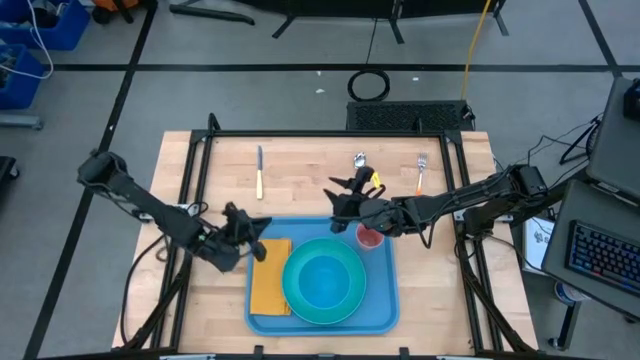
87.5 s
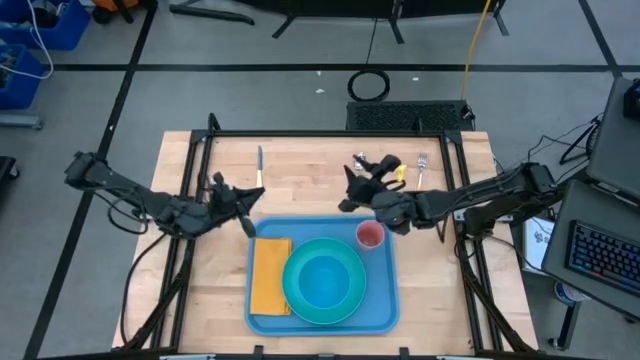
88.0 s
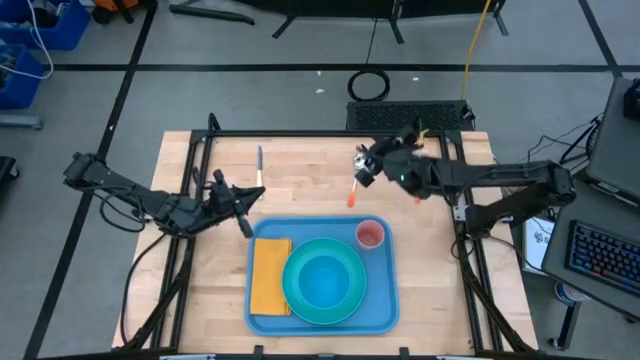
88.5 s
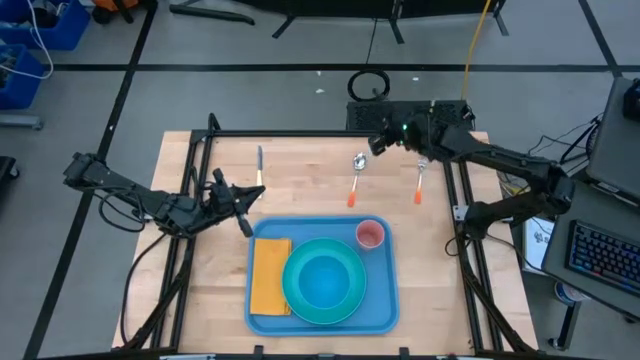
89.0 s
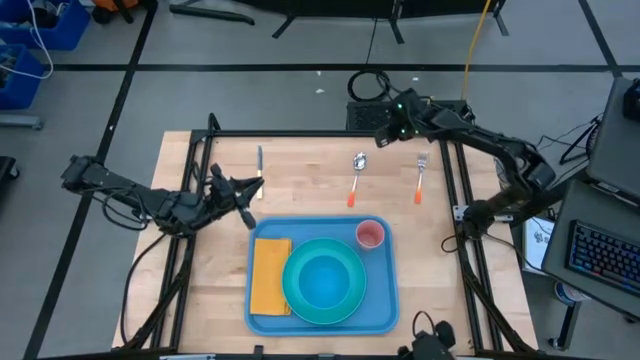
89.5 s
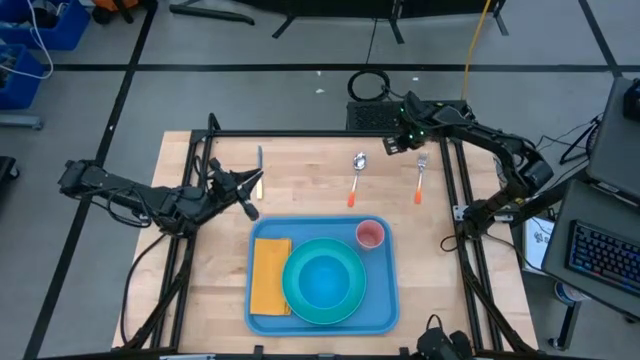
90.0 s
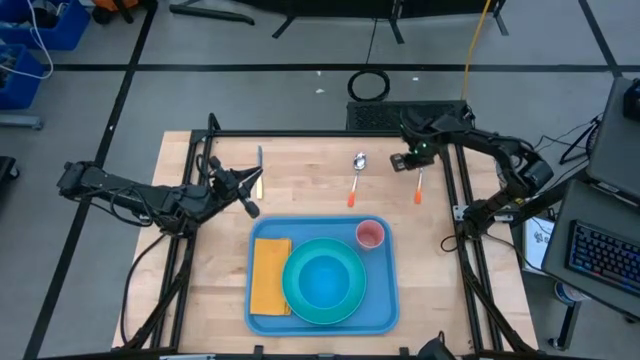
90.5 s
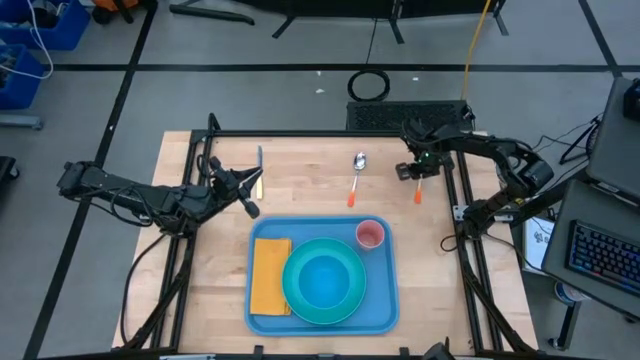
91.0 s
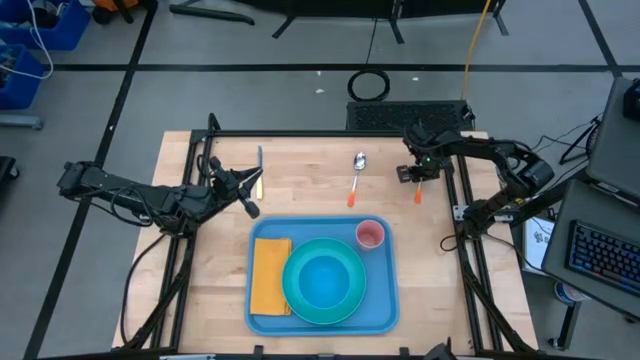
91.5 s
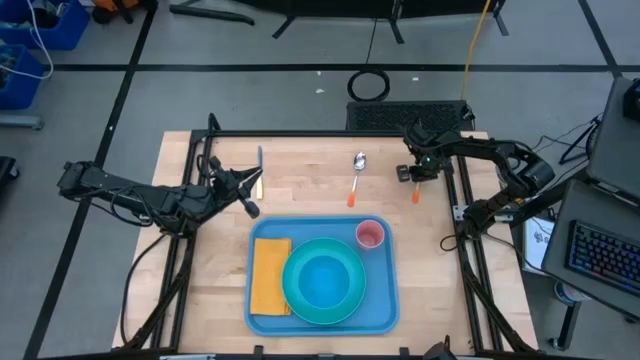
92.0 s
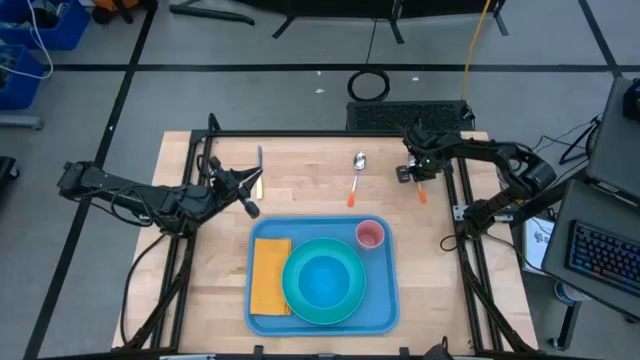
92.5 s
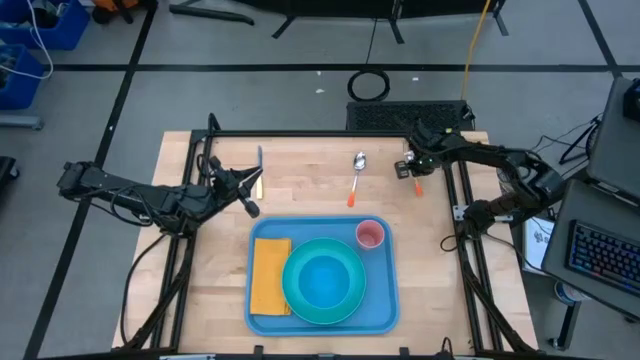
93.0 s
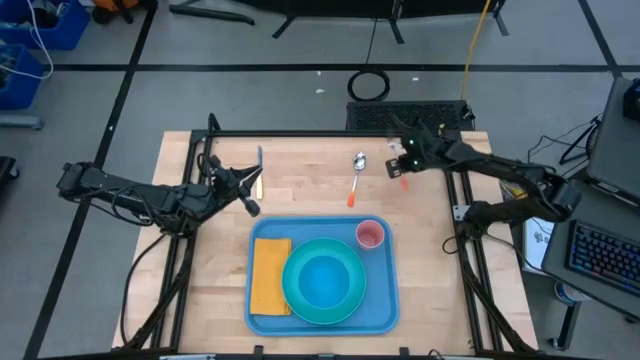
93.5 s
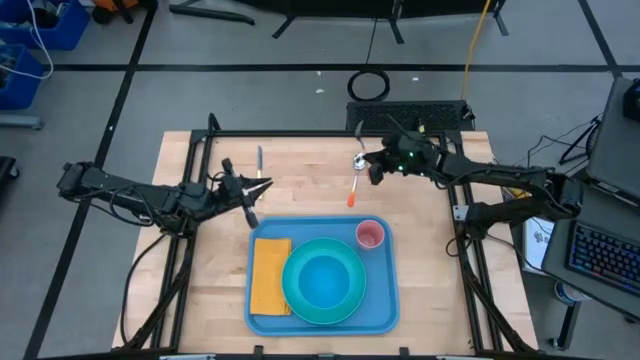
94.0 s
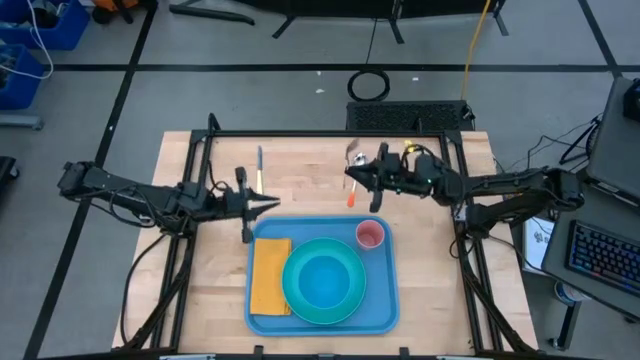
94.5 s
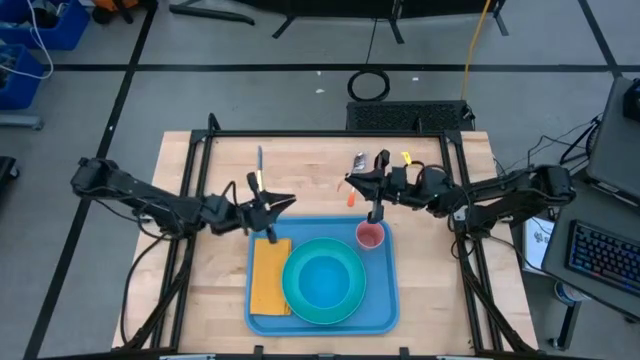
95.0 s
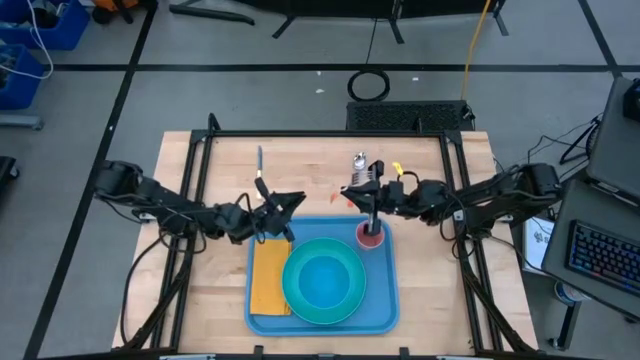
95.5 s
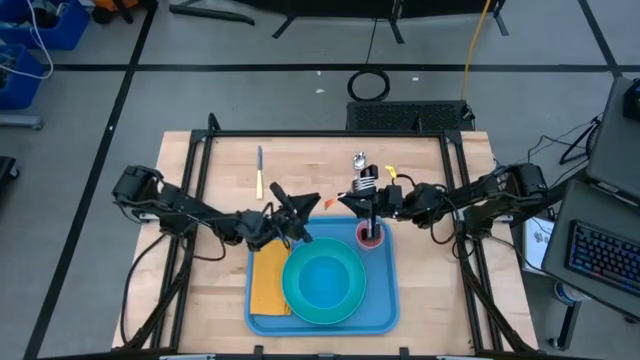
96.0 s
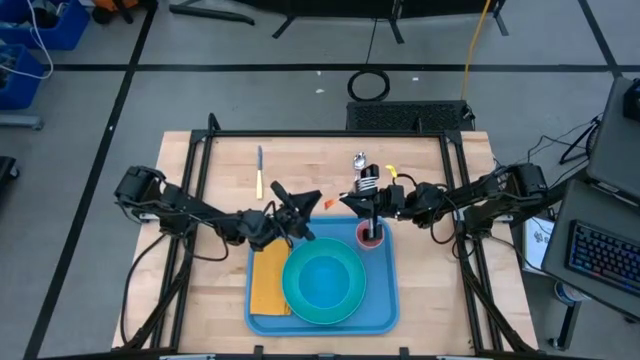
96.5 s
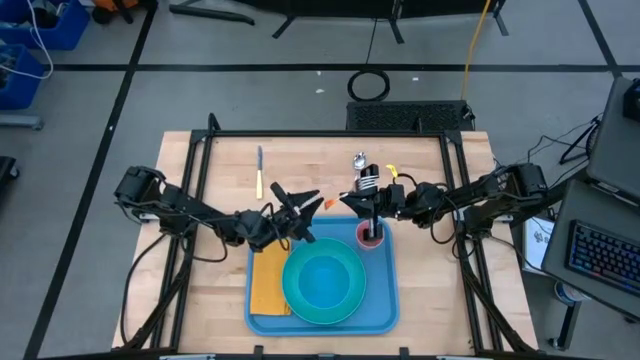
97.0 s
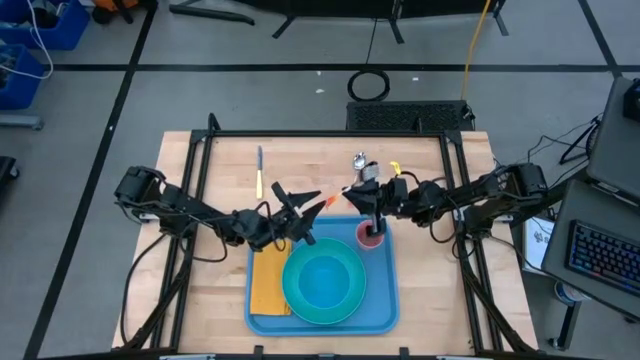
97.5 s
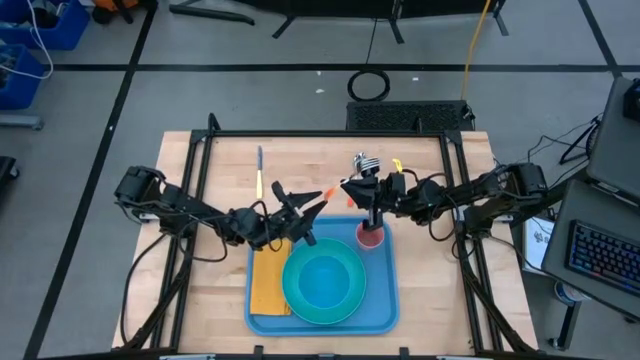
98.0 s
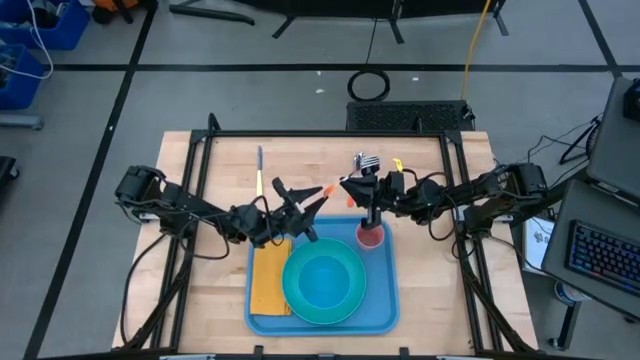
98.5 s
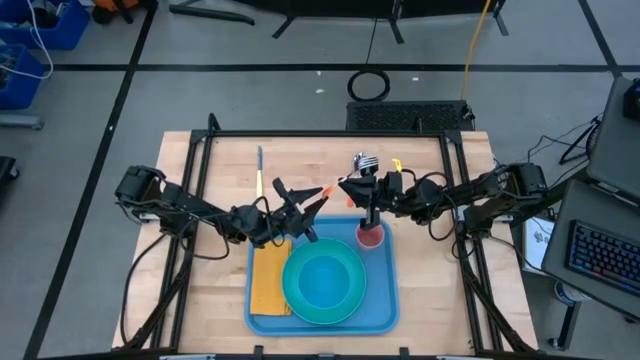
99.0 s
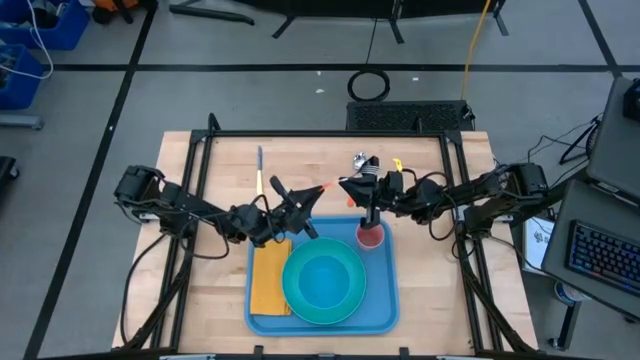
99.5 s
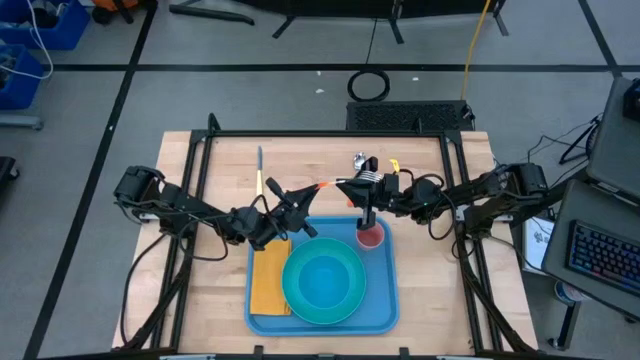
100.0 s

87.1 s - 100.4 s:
Task: Set up tray
Put the orange fork on top of the yellow napkin

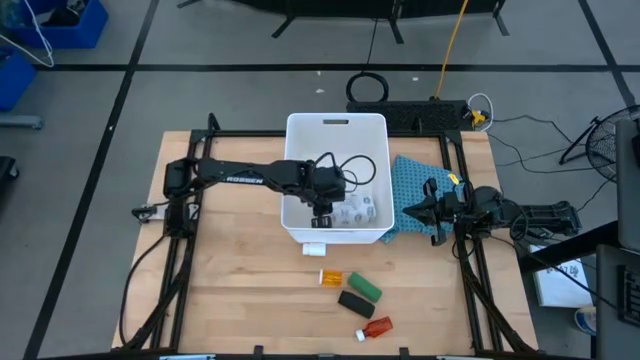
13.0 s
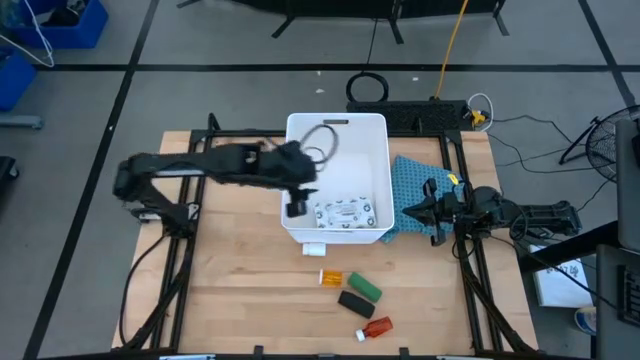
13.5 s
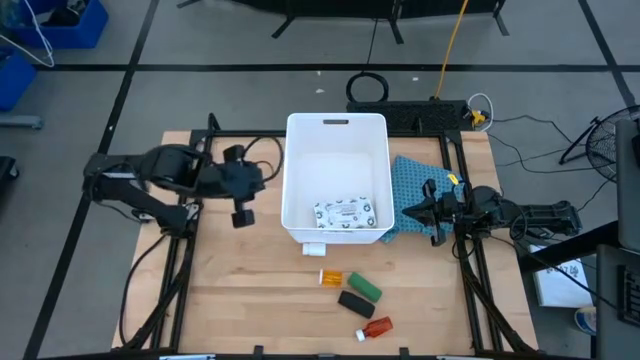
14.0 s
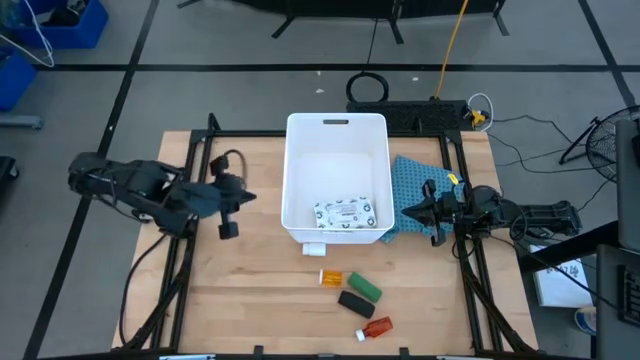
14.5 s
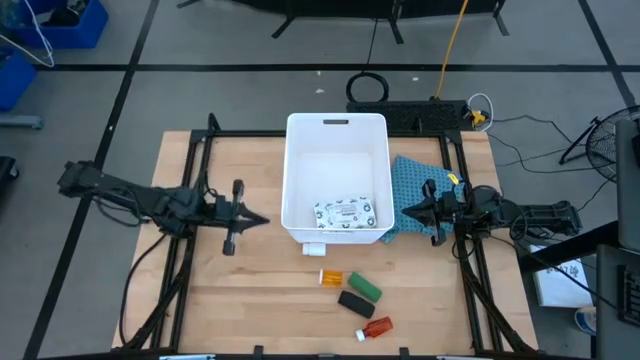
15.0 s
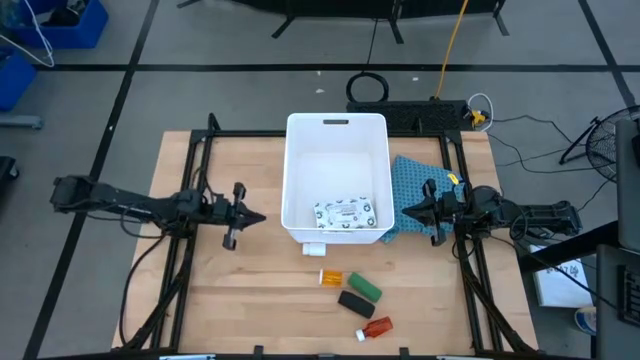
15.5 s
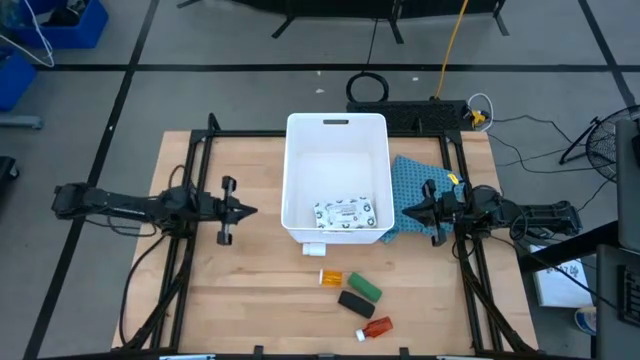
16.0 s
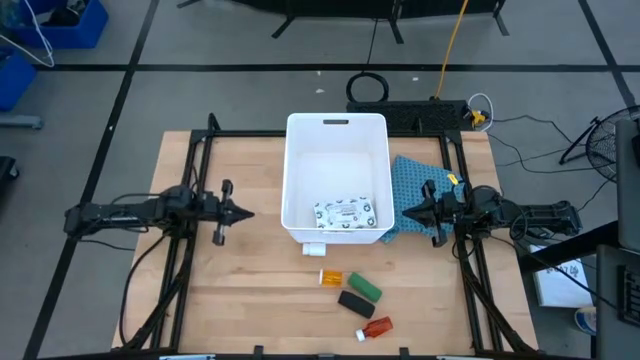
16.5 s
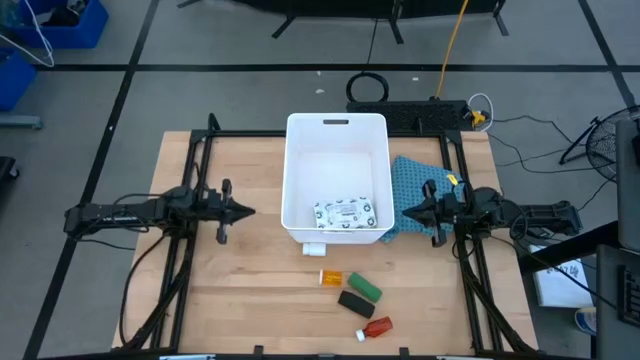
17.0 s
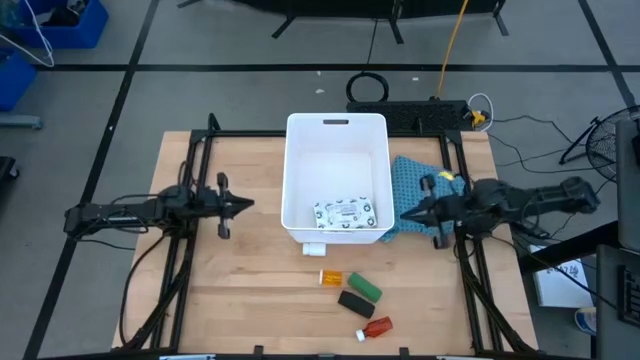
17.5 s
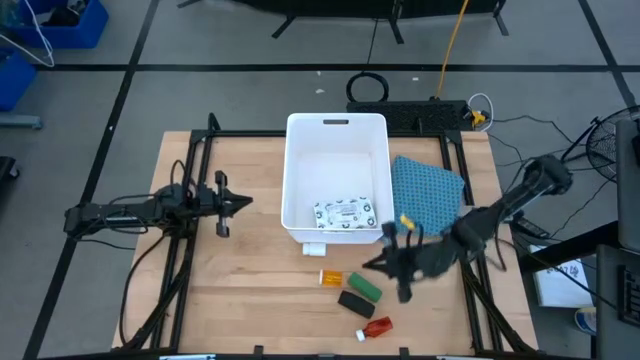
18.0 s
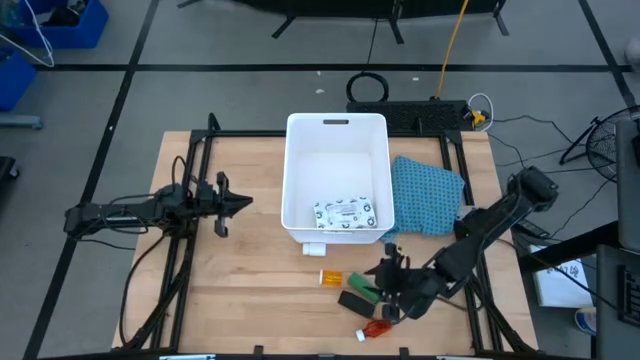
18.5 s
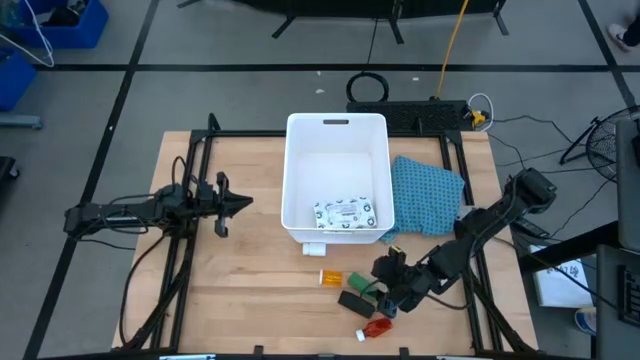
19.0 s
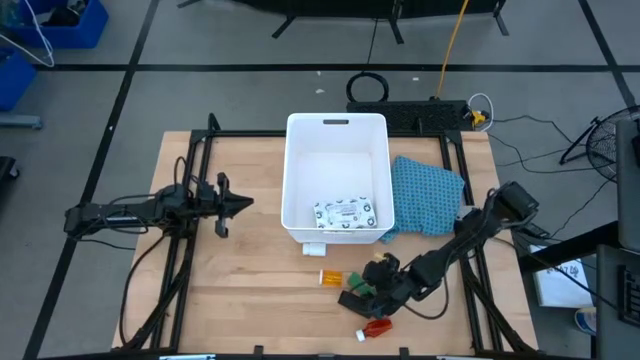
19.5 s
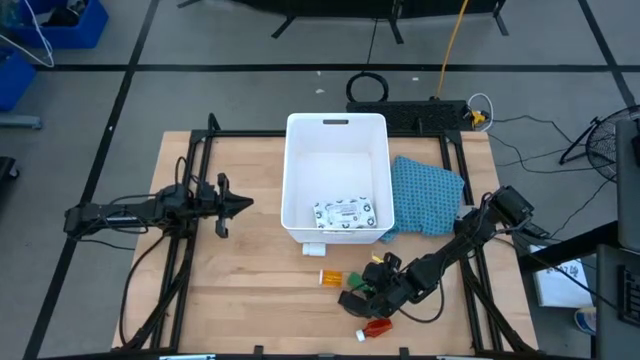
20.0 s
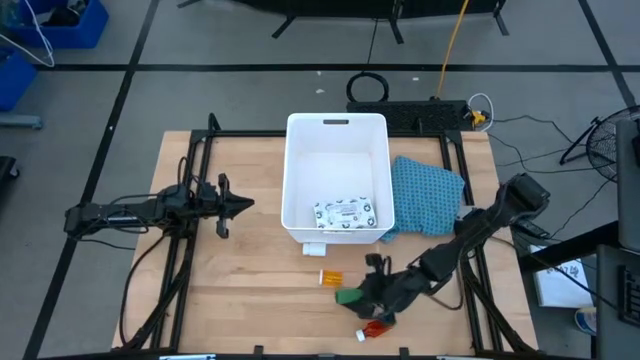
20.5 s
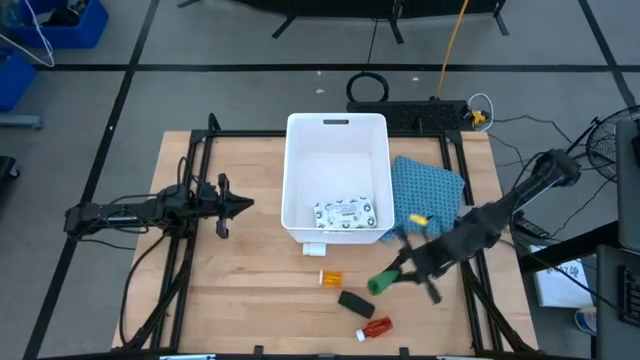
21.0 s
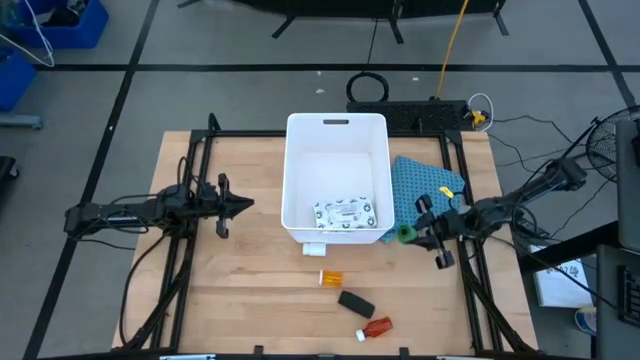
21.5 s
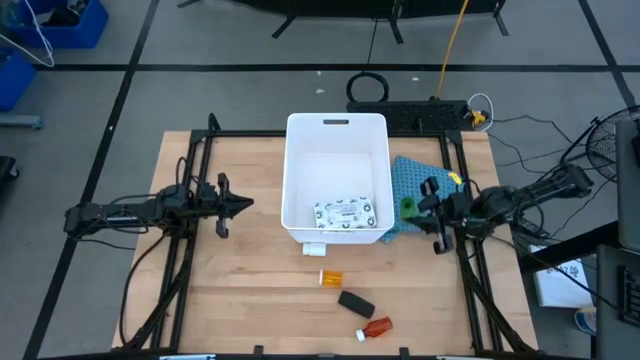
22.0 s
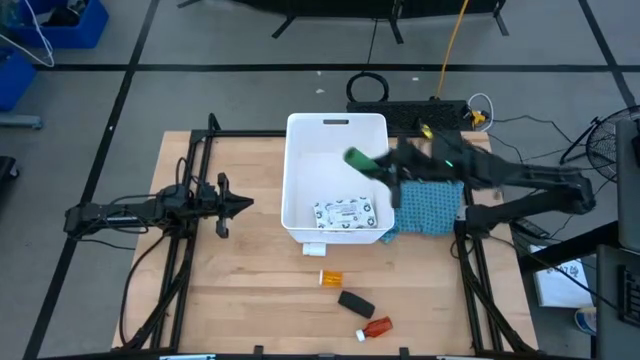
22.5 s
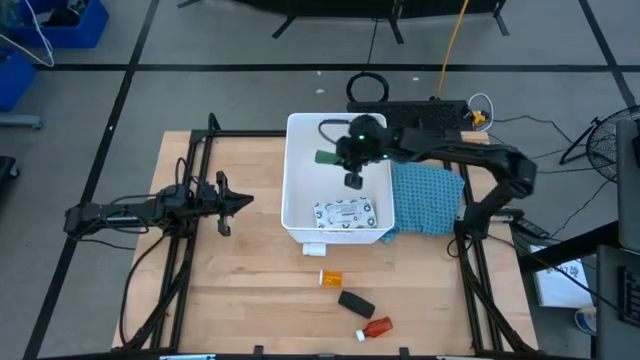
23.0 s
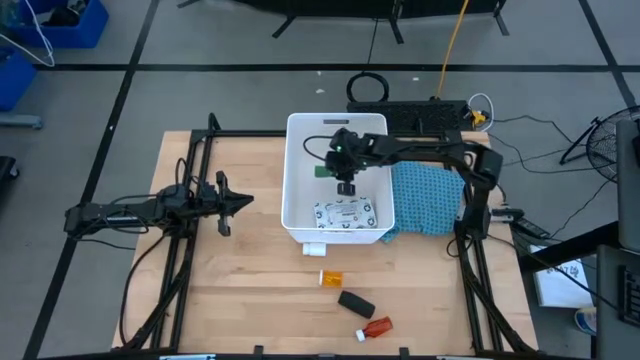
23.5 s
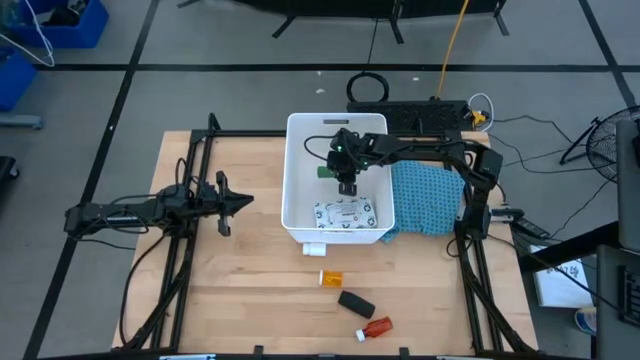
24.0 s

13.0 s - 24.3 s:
Task: Pick & place medical supplies in basket/bin
Put the green bandage into the bin
